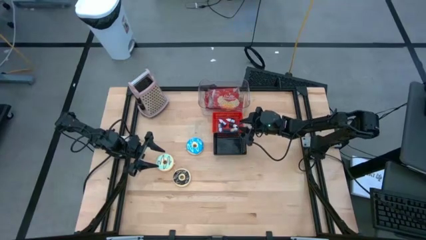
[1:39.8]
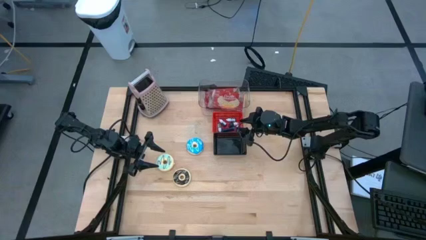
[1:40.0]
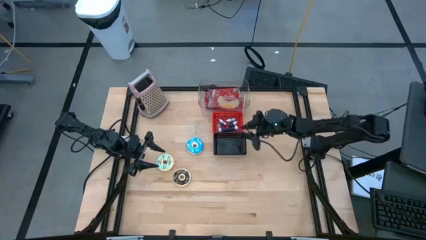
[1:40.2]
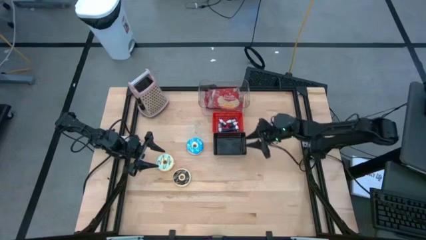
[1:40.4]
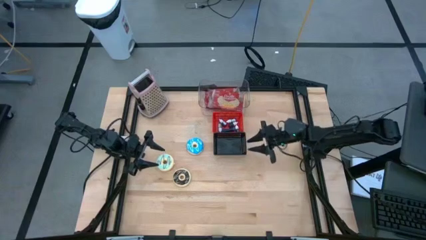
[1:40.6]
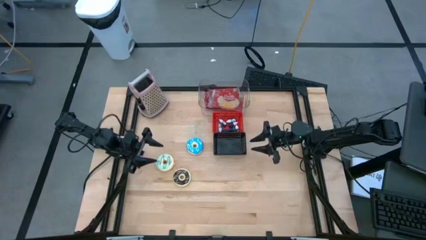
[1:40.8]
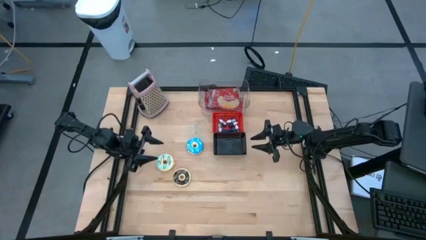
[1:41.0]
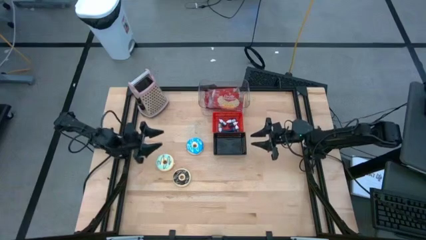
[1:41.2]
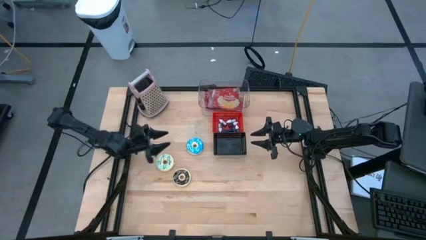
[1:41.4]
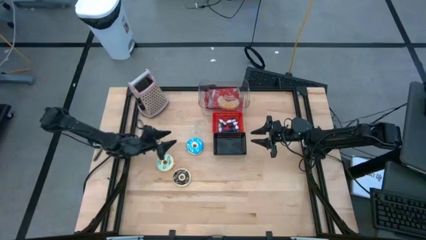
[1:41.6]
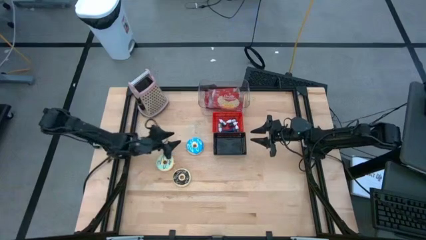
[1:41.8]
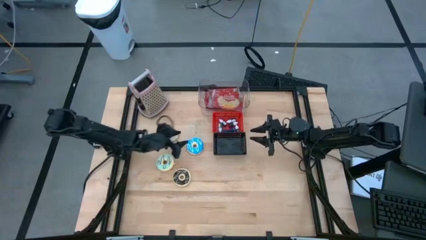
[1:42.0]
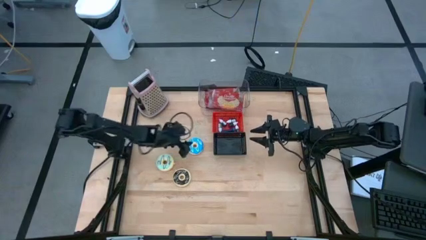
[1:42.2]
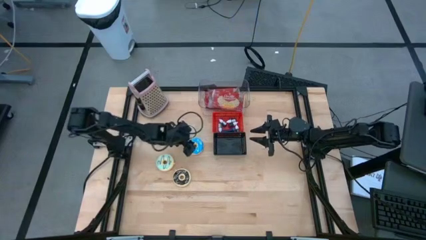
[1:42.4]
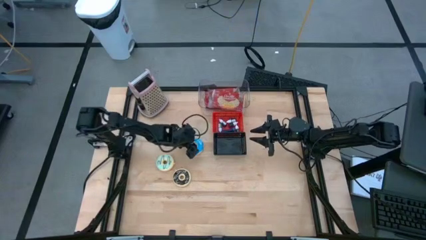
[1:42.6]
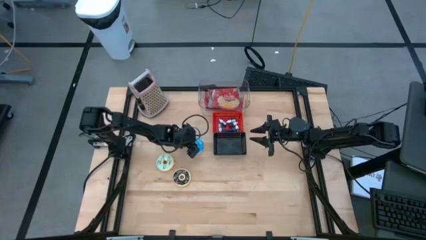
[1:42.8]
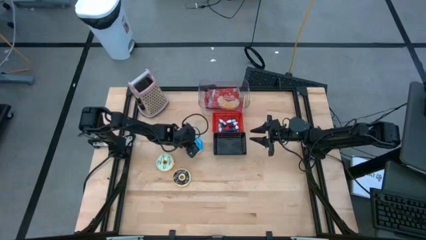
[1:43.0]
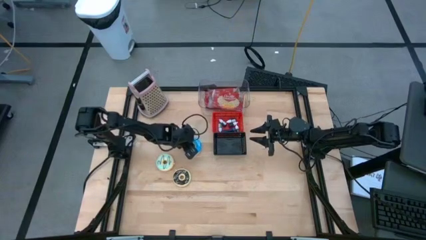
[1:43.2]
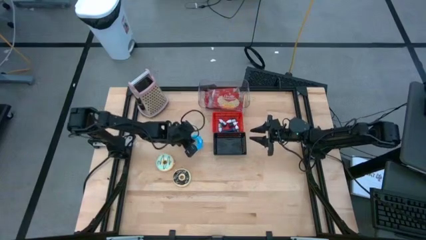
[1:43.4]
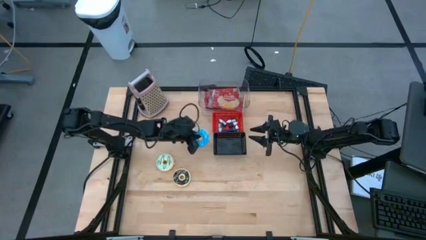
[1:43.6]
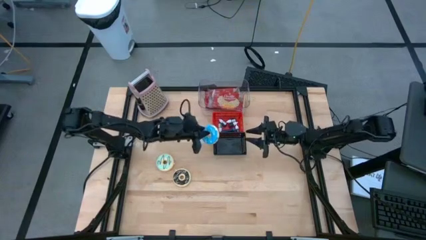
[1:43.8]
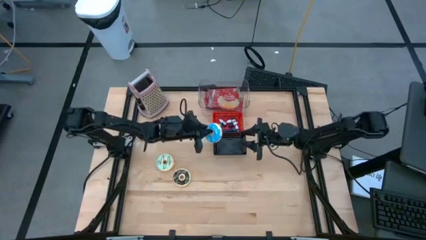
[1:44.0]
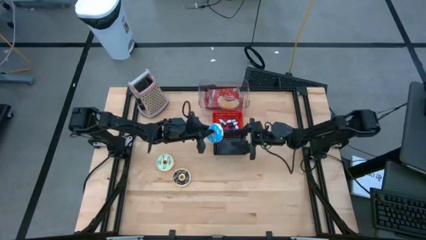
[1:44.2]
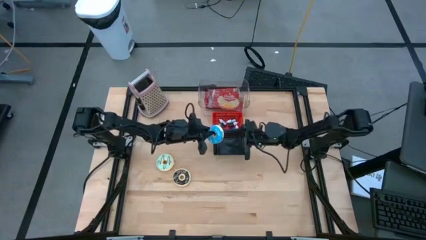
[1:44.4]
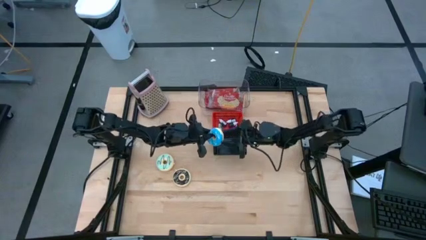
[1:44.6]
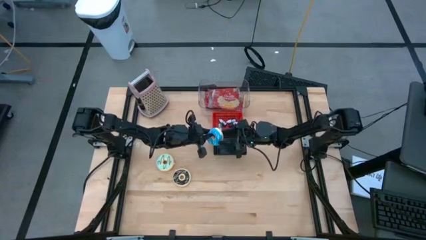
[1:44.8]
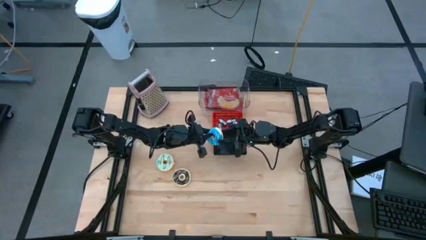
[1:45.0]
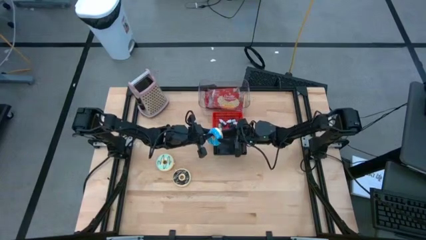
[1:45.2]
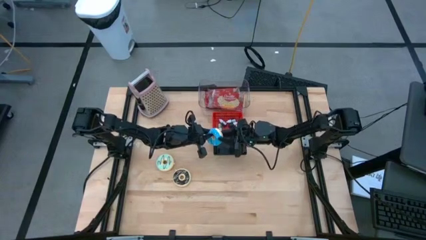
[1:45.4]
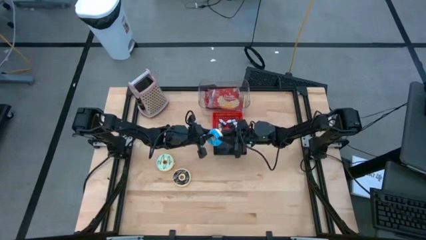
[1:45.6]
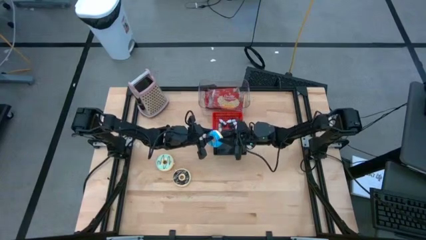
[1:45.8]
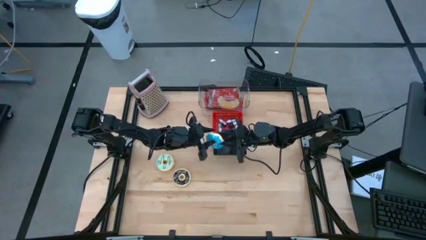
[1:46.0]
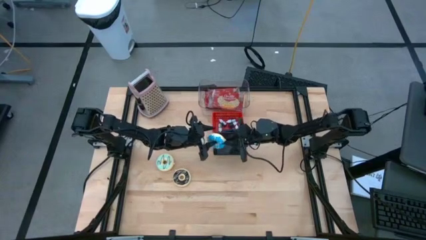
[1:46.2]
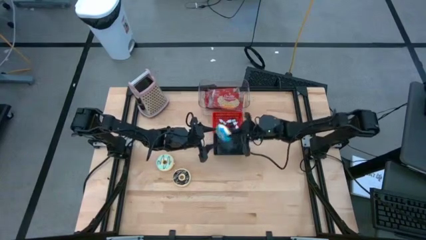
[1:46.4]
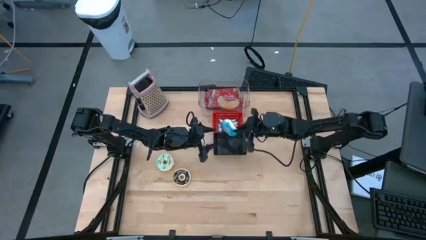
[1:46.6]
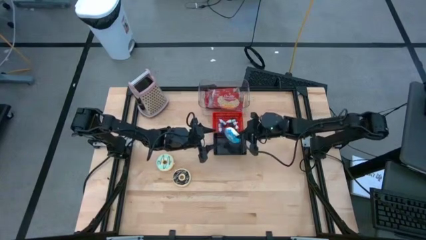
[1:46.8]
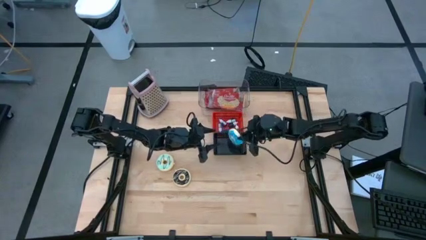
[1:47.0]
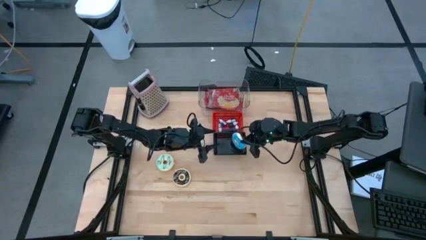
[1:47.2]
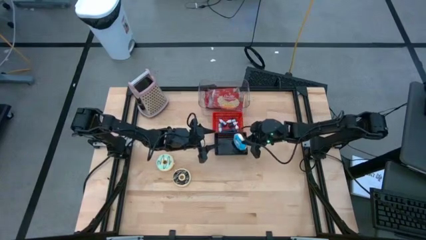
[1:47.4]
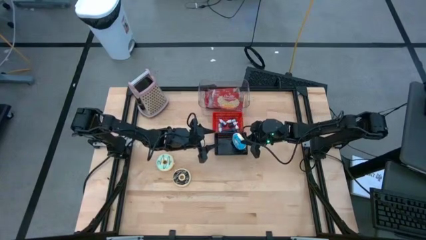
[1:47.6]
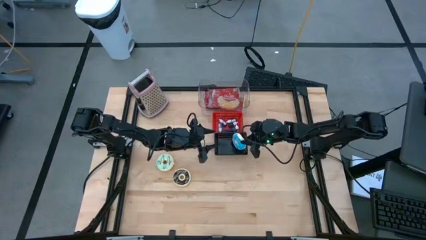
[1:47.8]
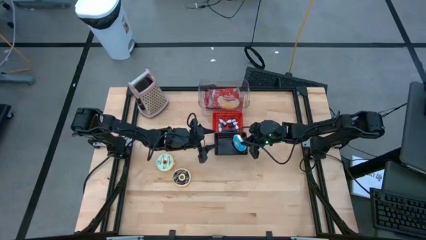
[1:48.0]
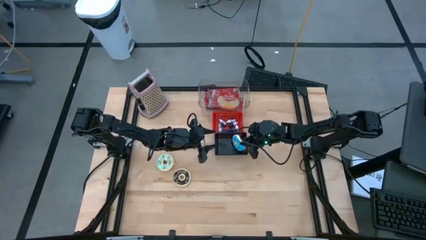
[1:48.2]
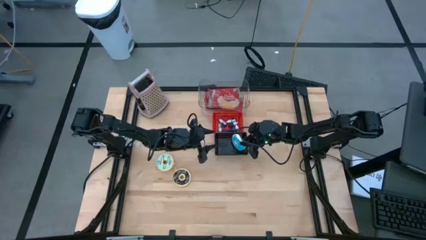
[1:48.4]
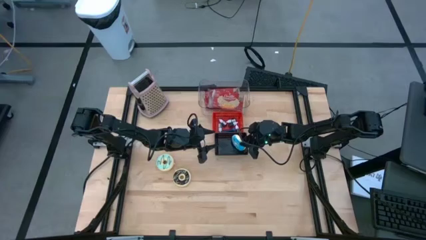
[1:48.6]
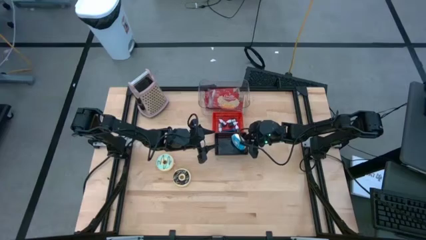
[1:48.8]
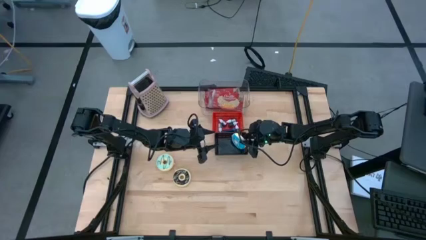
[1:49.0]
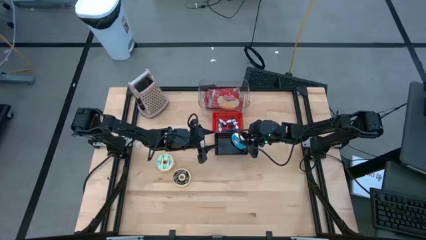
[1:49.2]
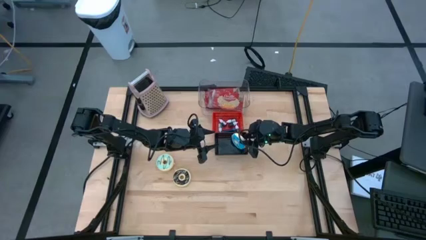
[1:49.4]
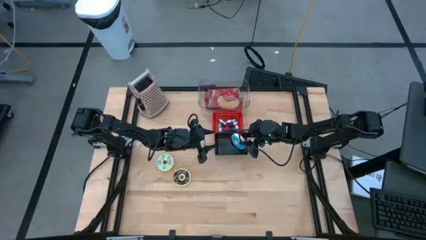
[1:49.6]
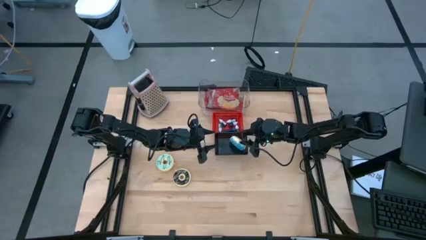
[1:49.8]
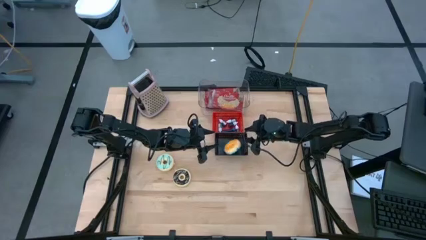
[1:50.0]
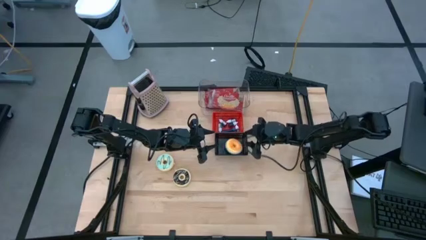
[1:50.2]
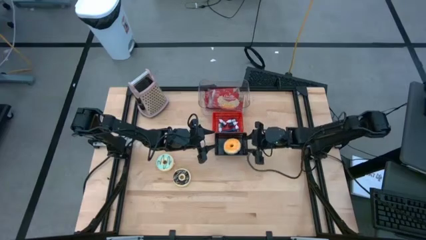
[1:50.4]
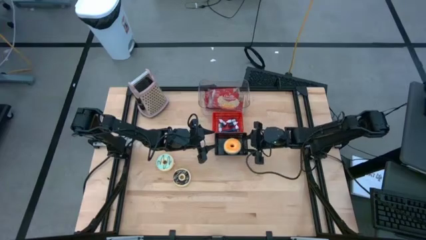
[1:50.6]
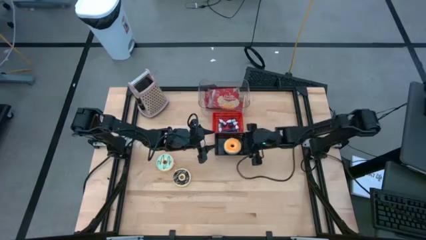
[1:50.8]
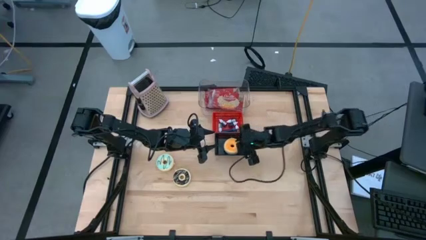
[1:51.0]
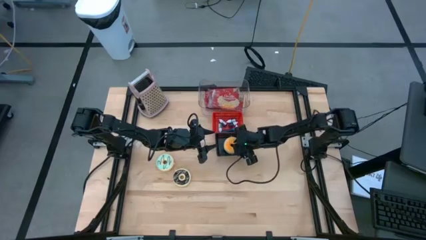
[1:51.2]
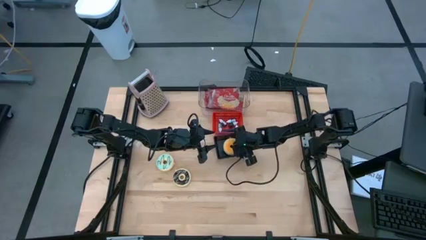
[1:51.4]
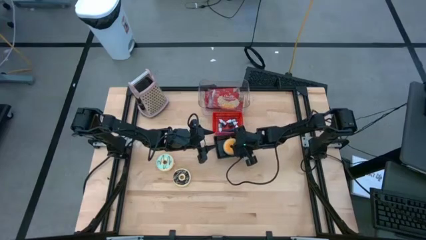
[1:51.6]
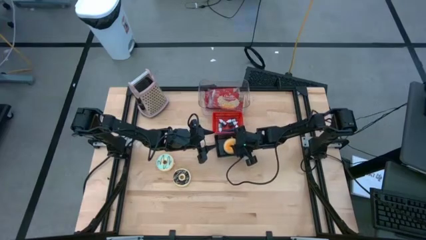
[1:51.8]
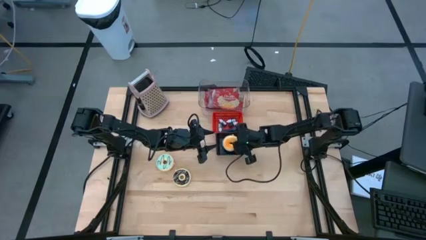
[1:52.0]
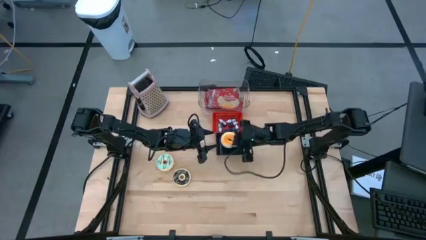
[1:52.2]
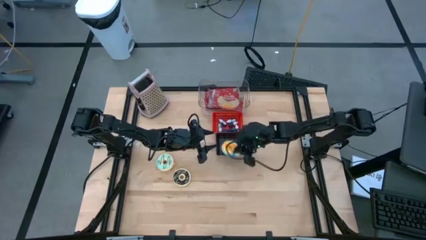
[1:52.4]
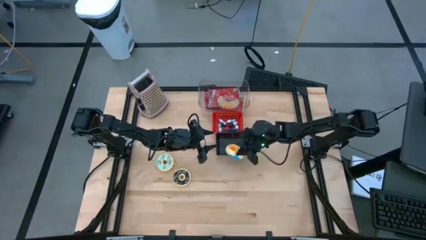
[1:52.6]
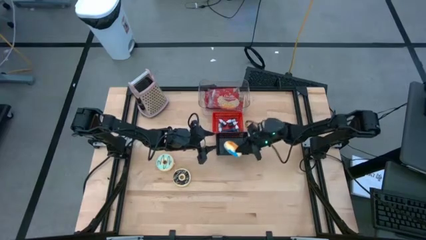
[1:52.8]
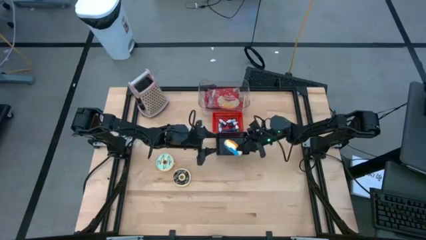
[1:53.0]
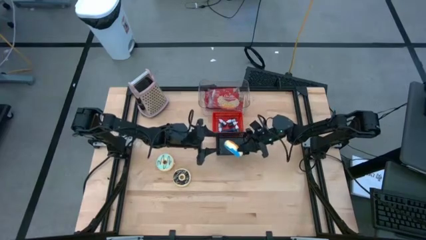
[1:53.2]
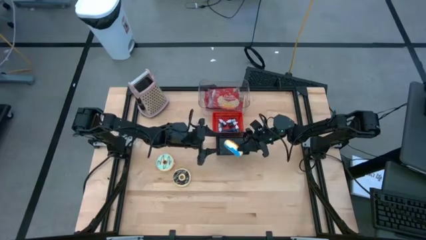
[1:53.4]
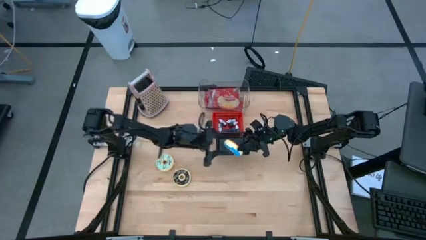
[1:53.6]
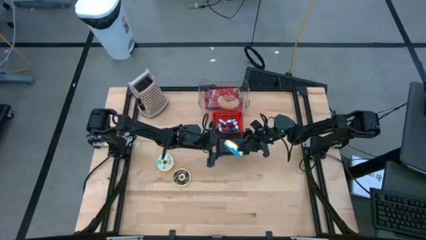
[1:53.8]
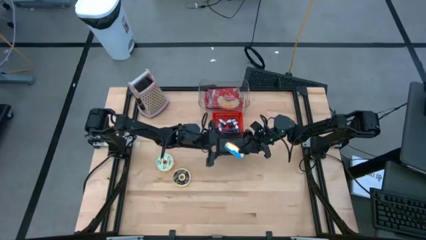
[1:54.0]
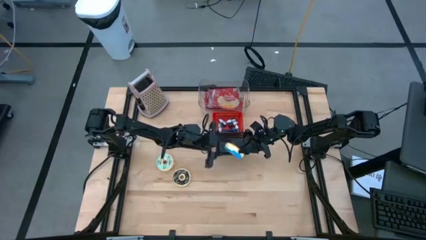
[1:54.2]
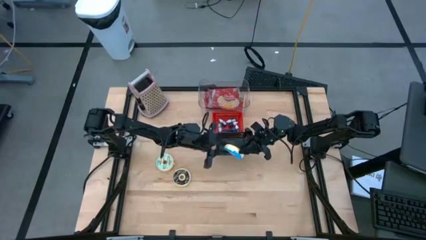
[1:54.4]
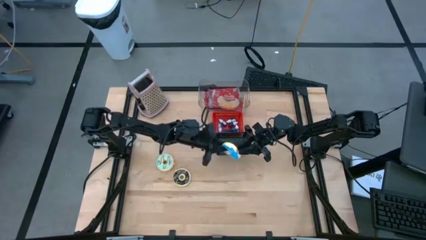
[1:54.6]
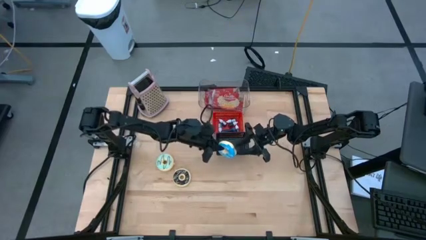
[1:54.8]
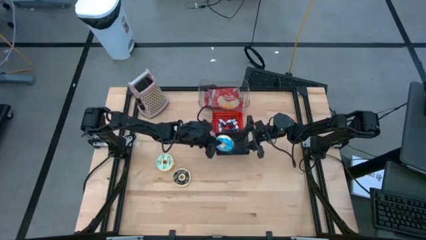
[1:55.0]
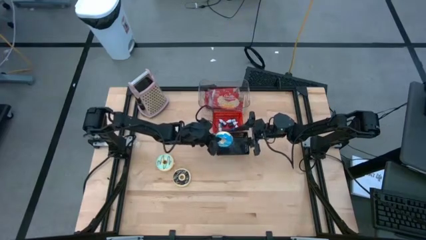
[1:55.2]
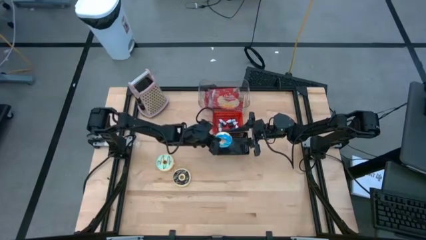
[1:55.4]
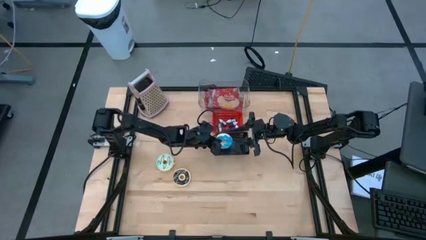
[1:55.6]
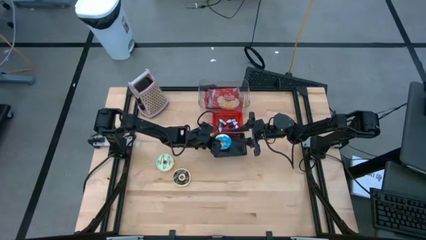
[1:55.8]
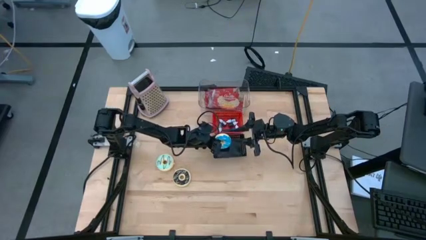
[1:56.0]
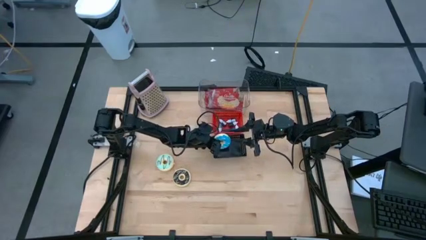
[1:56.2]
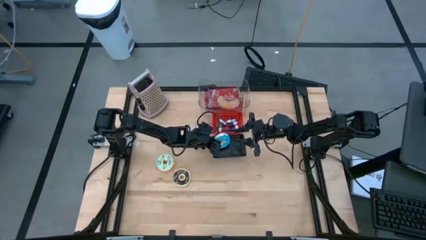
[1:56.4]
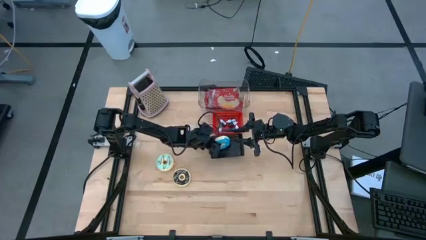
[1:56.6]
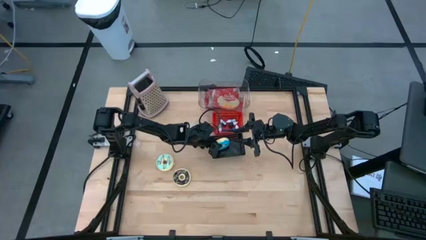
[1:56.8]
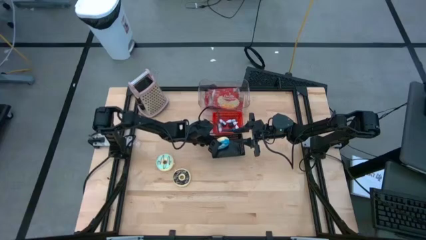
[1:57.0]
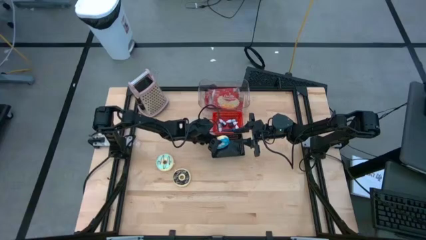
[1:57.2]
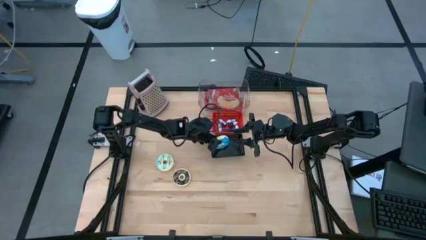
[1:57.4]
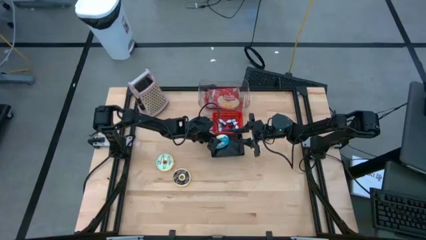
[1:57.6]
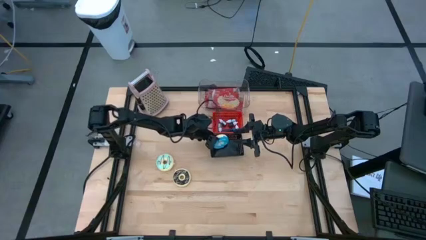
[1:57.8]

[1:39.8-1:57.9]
Put the blue doughnut into the black bin
